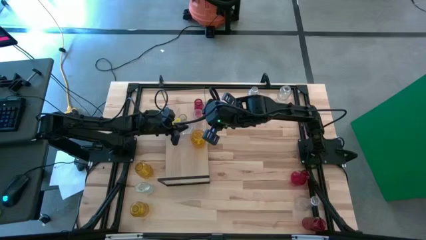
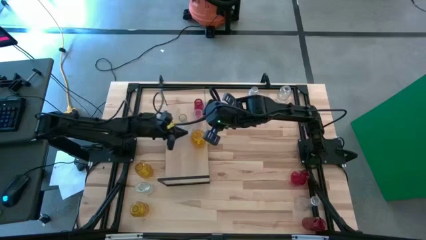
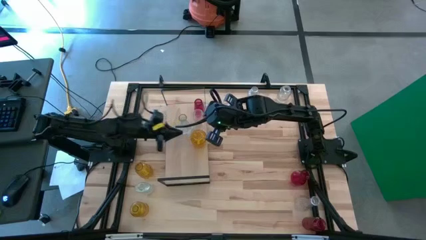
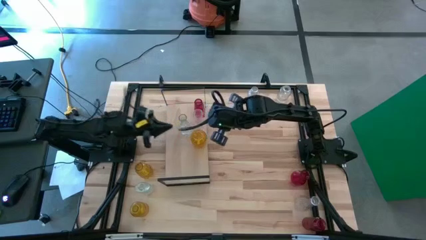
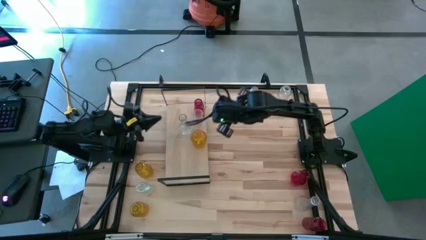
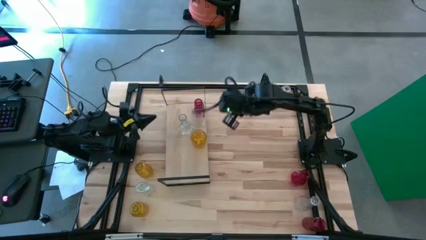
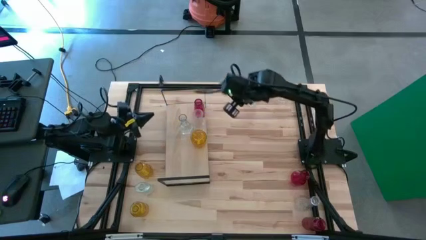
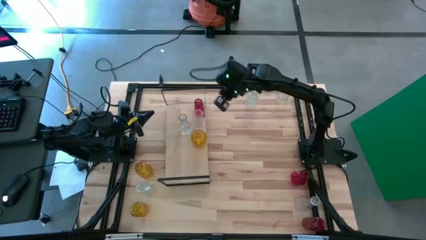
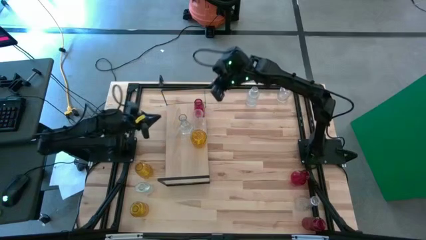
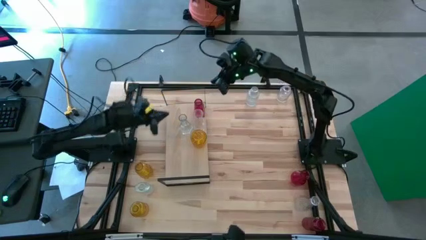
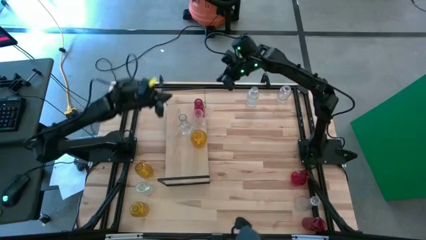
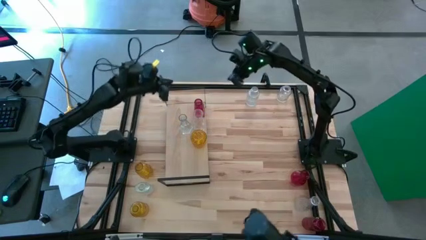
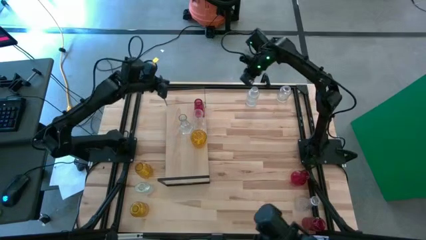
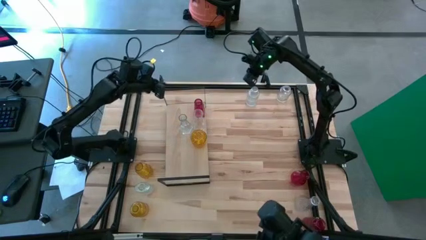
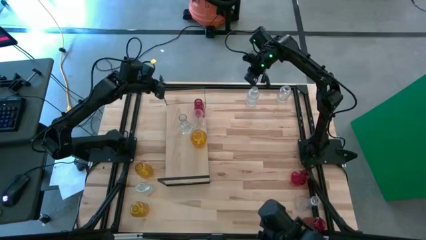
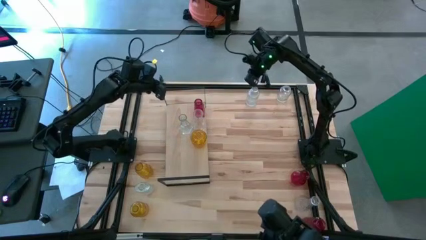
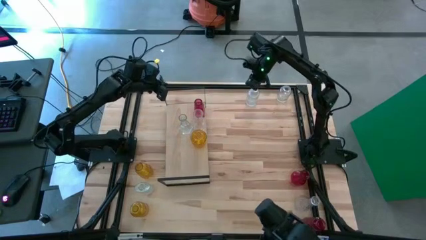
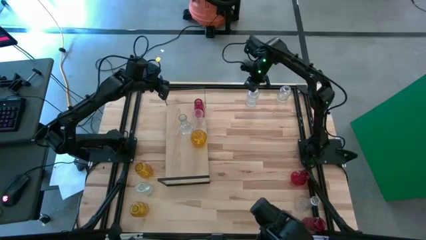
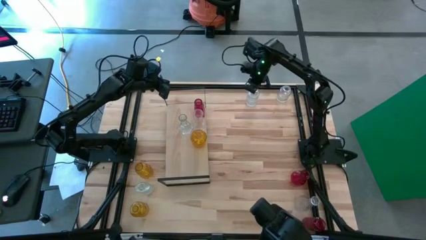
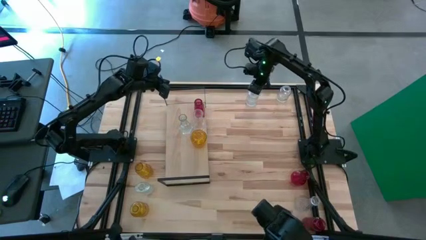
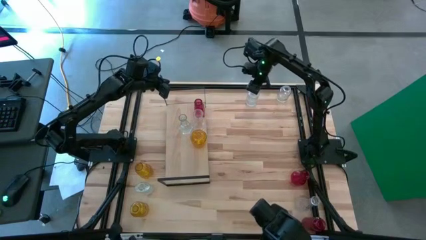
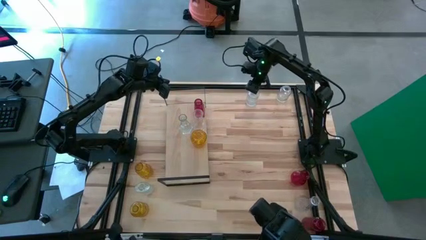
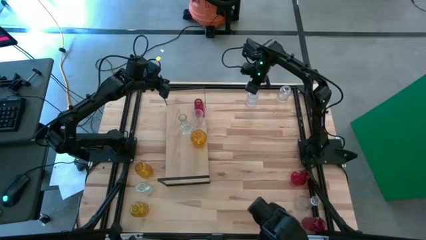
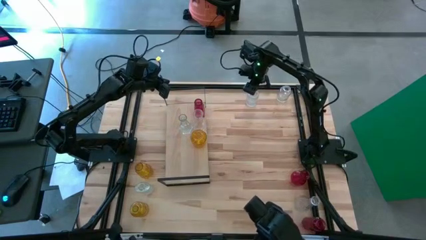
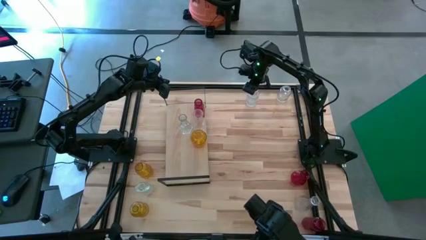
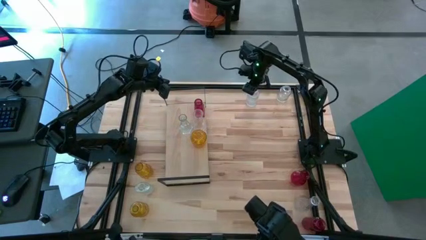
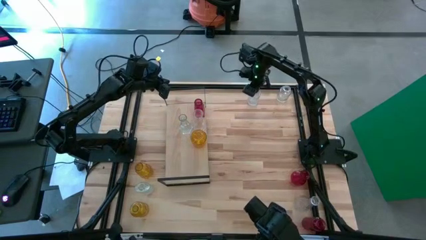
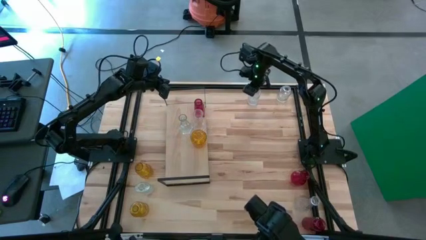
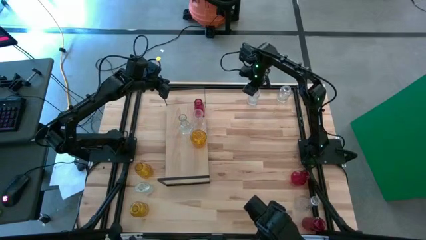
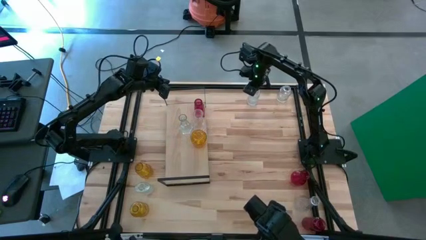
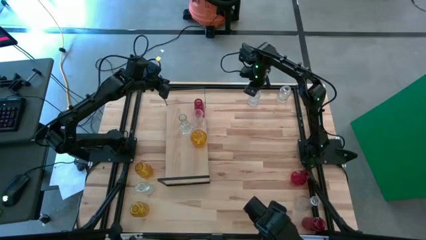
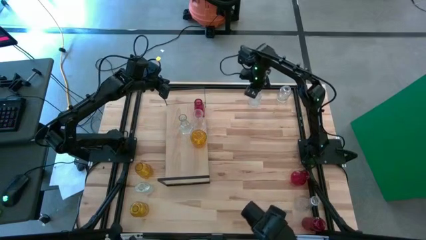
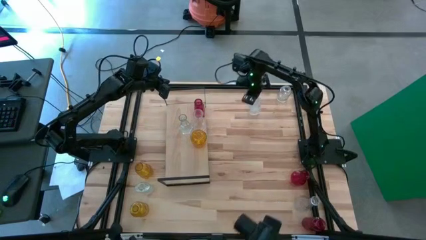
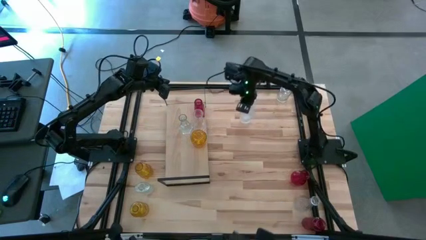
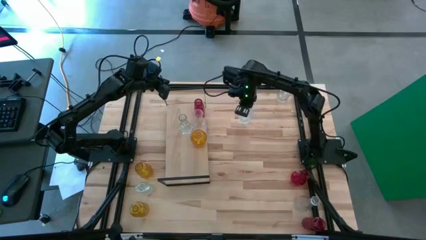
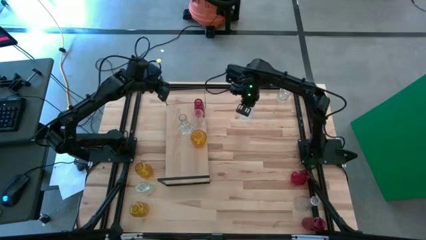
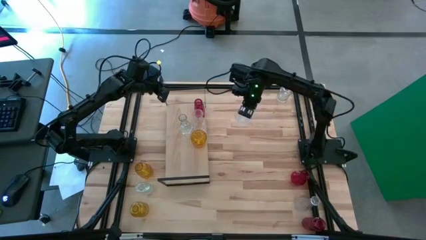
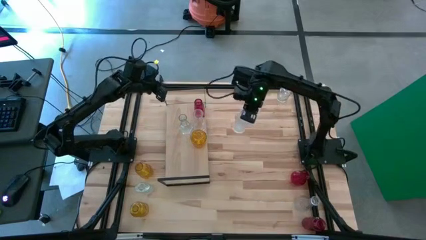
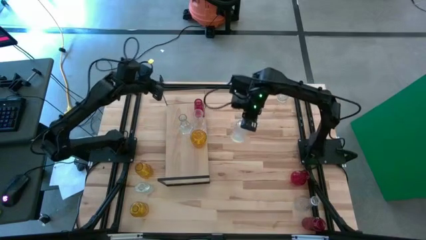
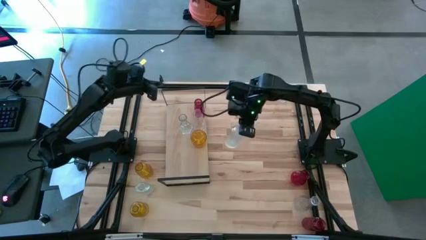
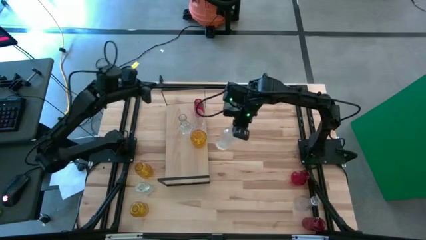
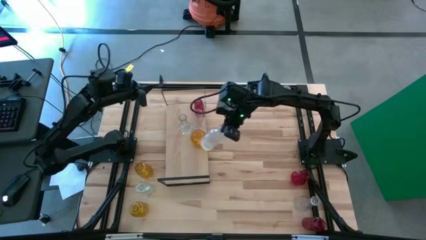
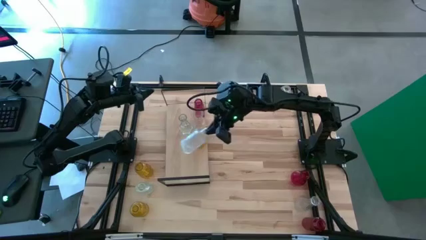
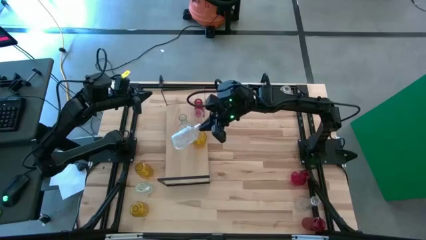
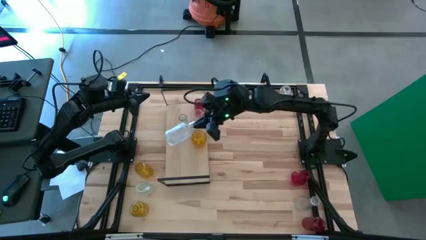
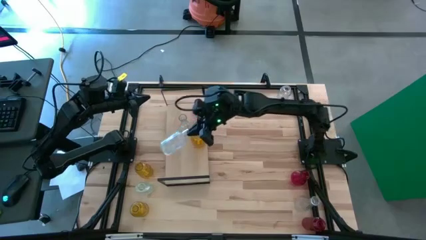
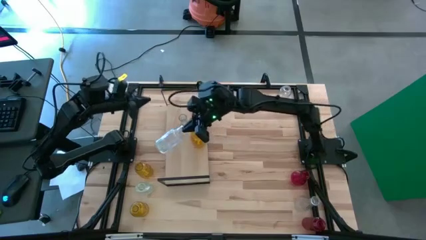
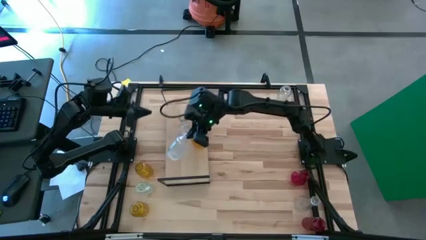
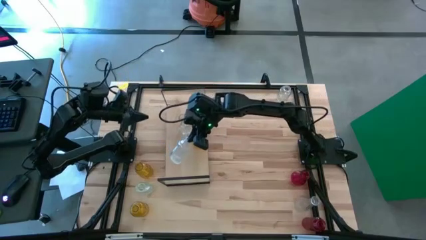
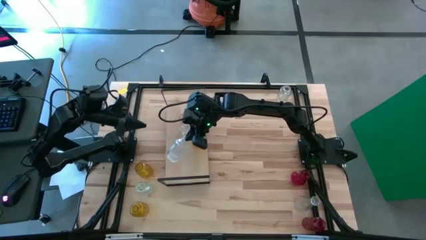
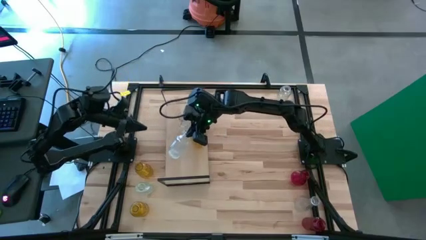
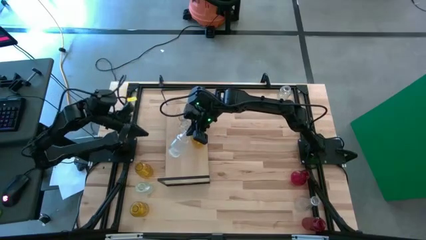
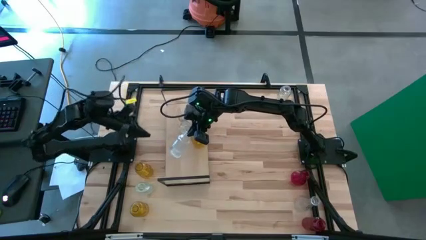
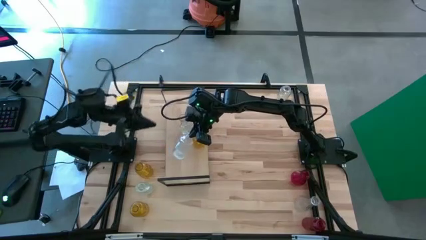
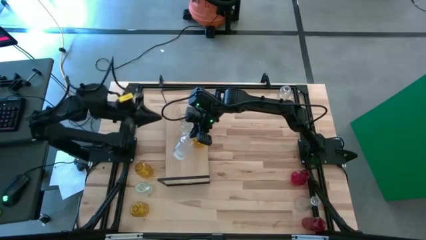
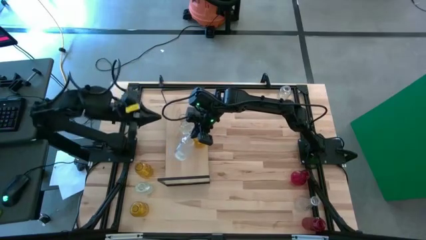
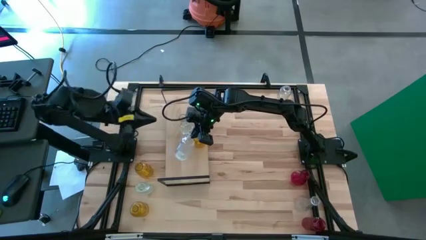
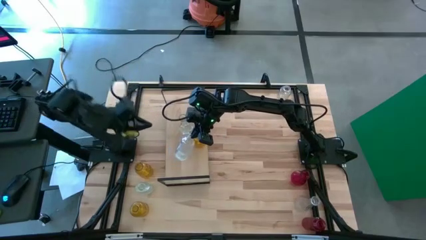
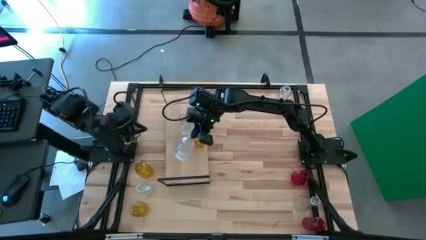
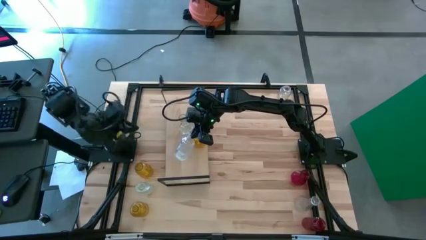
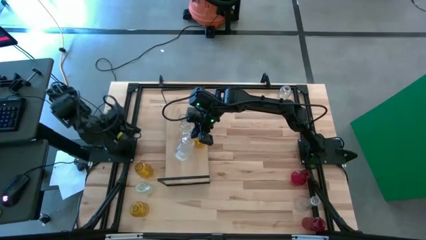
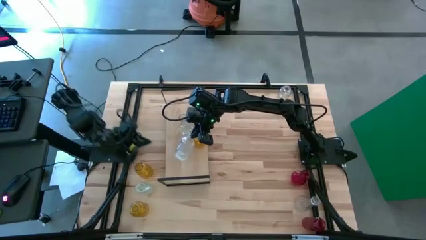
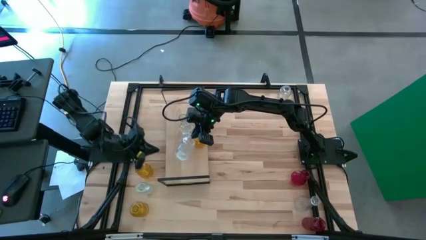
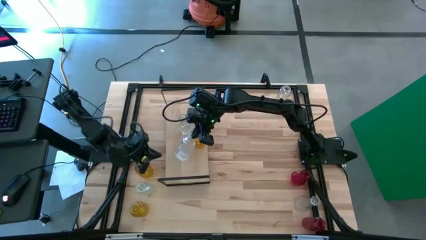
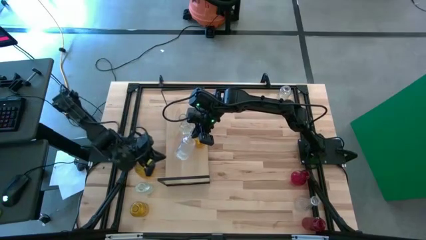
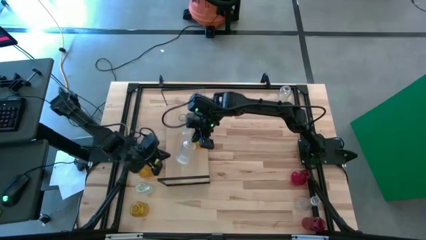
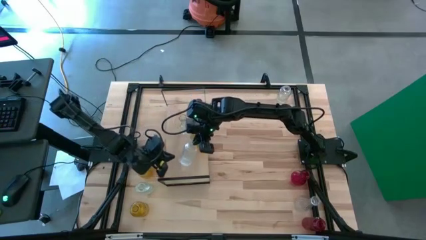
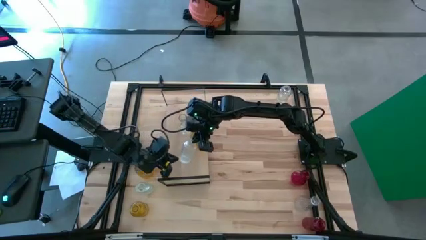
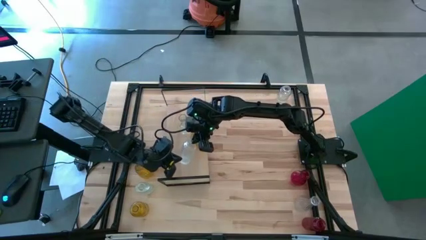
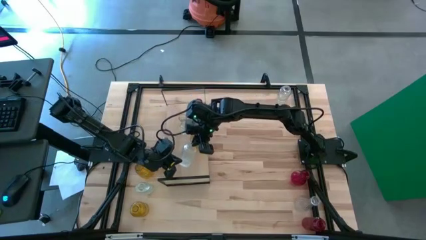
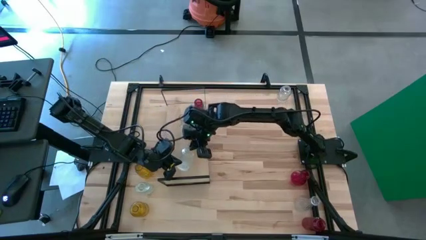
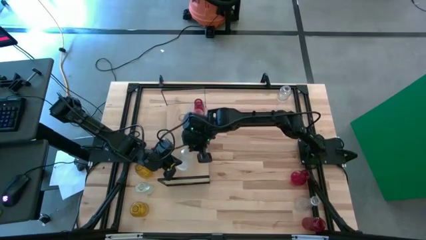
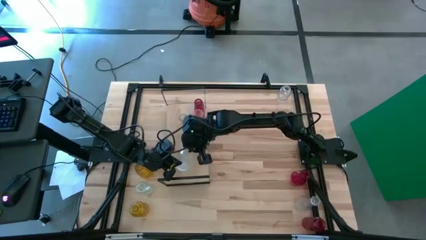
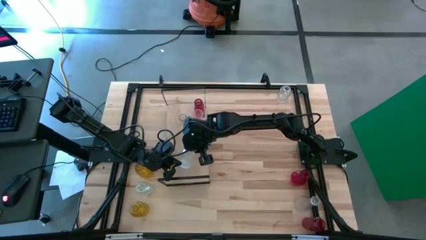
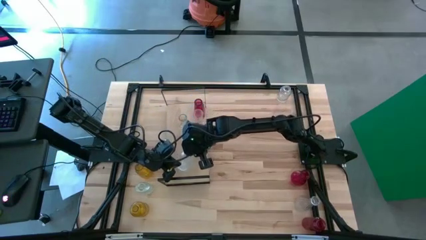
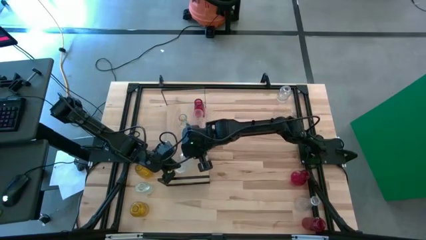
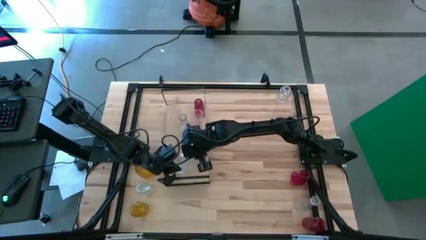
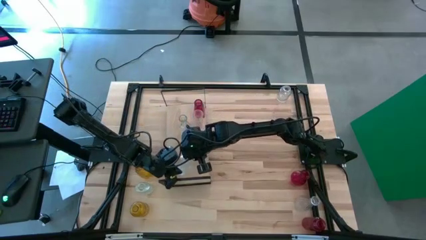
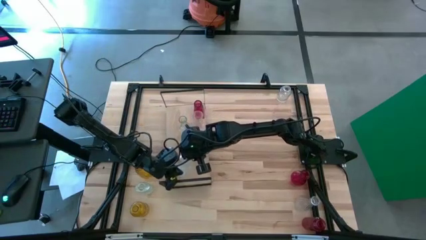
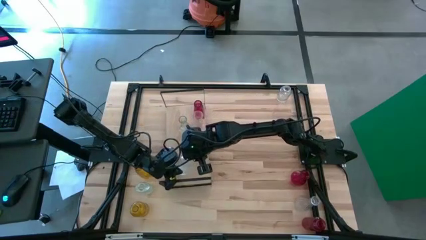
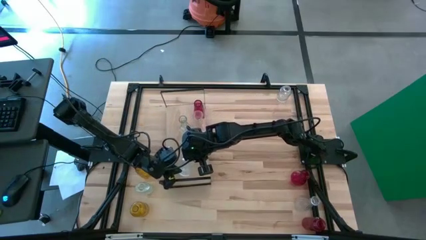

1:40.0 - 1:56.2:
Task: sort vases onto shelf
Put the transparent vase on the shelf aligned with the other transparent vase
